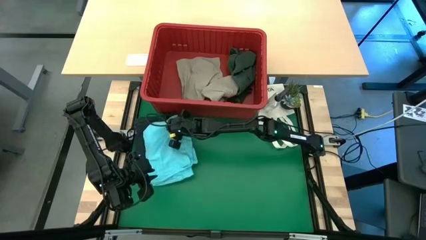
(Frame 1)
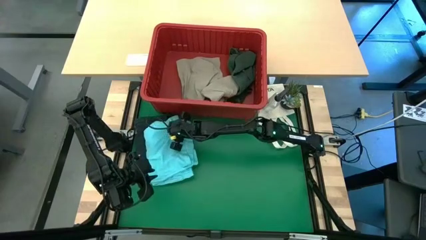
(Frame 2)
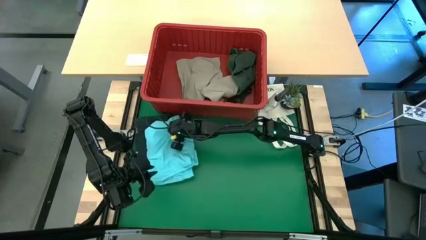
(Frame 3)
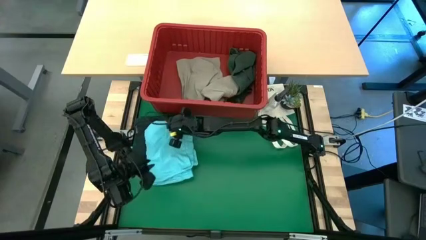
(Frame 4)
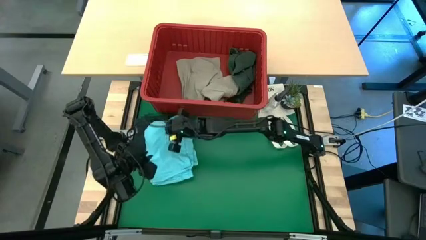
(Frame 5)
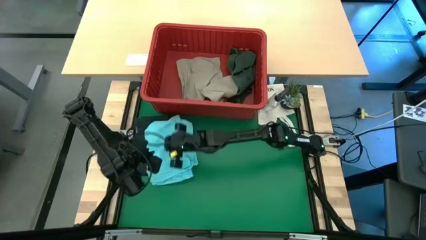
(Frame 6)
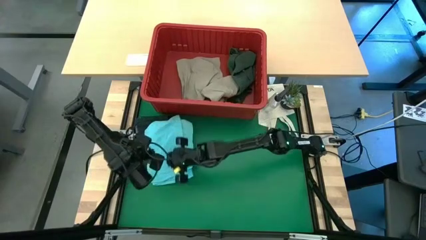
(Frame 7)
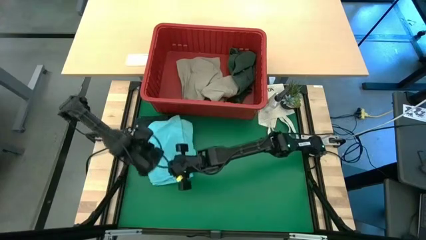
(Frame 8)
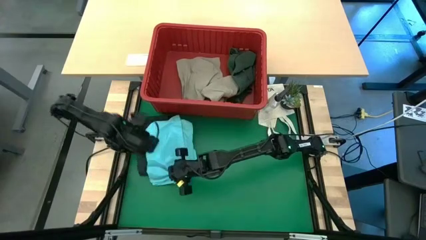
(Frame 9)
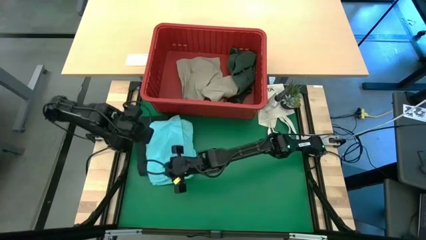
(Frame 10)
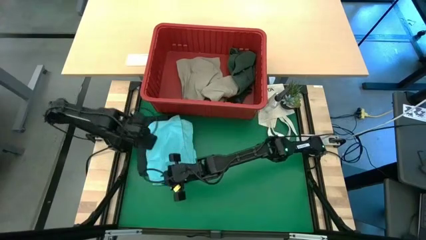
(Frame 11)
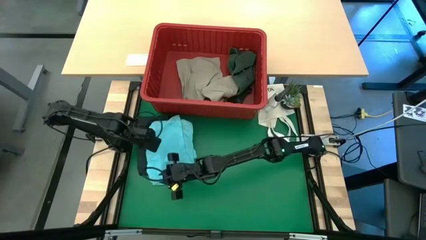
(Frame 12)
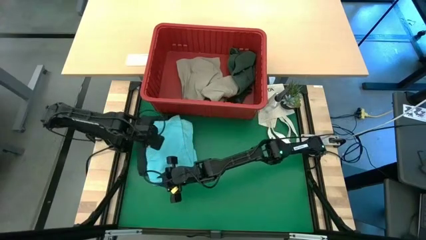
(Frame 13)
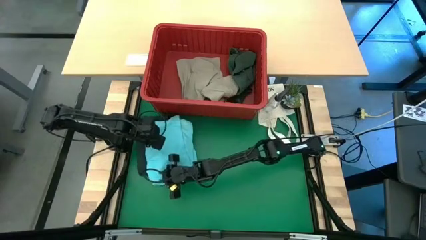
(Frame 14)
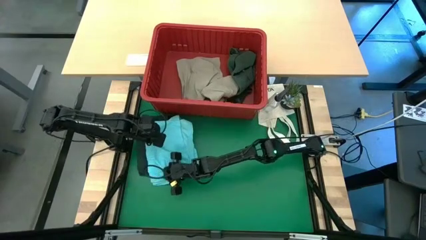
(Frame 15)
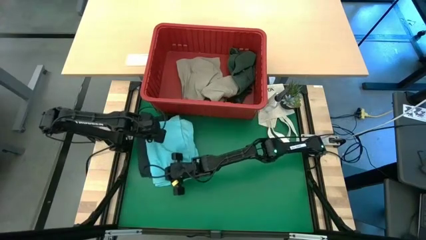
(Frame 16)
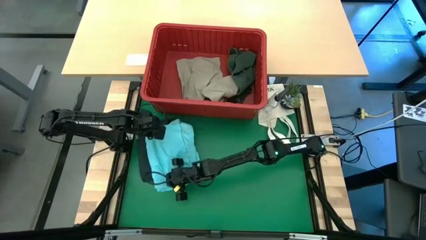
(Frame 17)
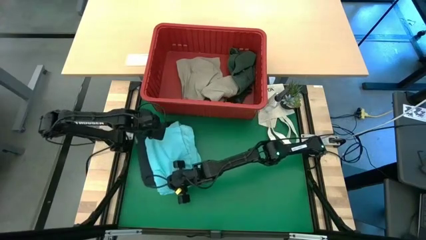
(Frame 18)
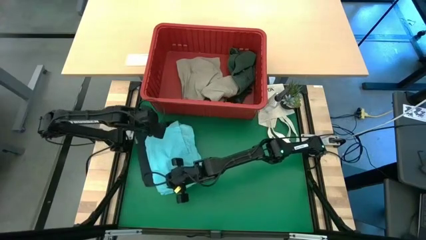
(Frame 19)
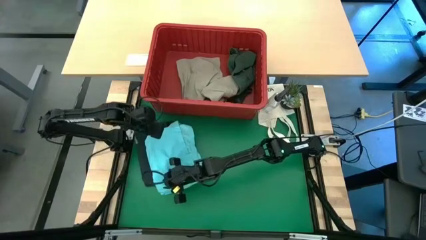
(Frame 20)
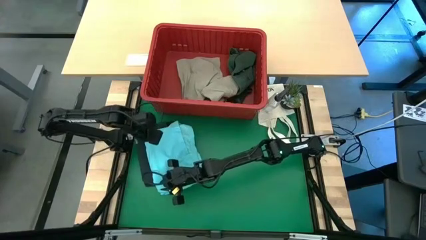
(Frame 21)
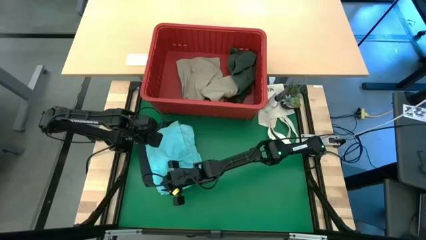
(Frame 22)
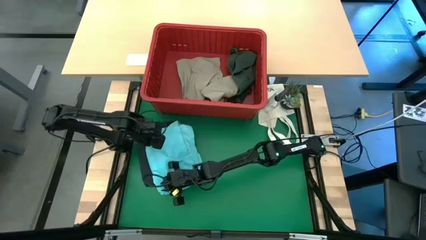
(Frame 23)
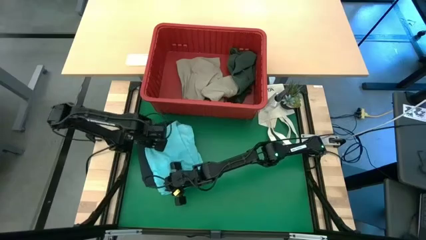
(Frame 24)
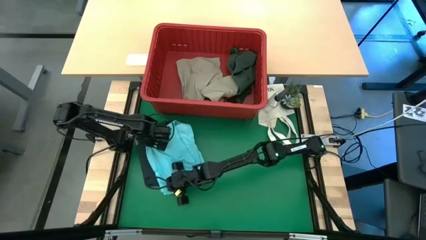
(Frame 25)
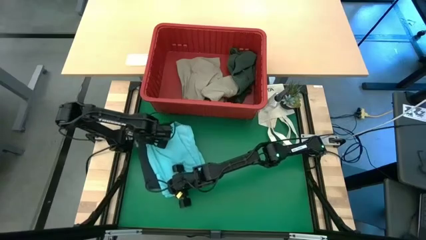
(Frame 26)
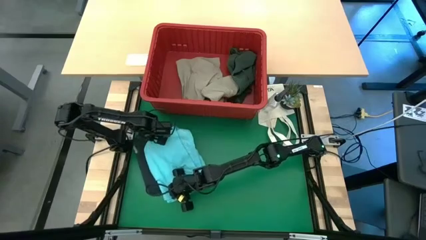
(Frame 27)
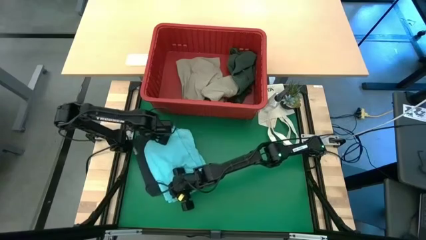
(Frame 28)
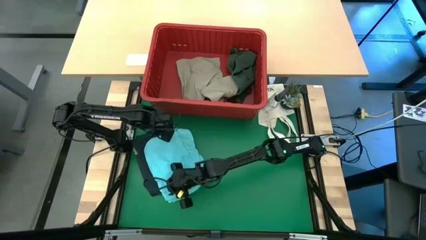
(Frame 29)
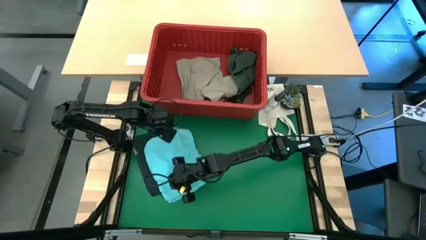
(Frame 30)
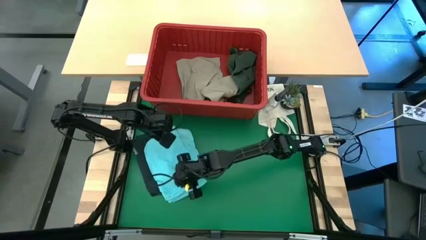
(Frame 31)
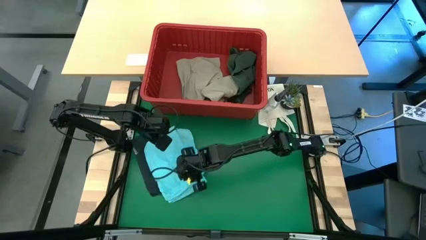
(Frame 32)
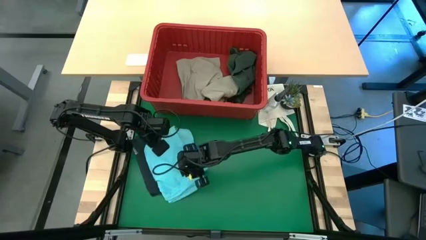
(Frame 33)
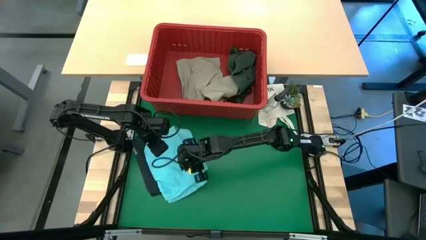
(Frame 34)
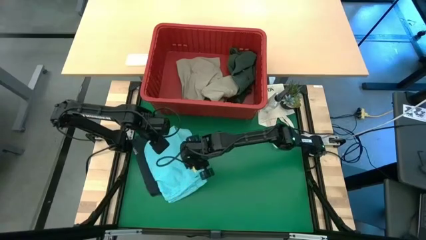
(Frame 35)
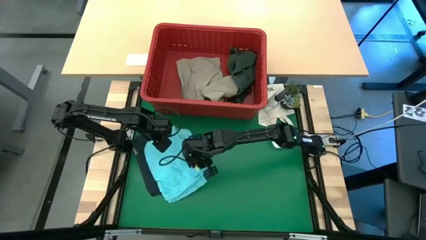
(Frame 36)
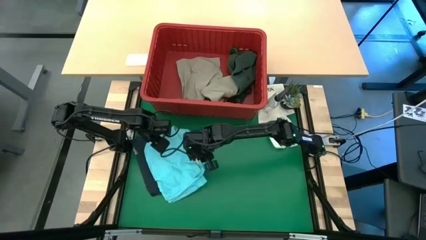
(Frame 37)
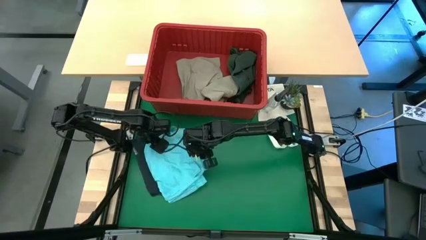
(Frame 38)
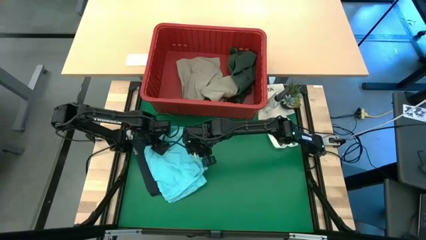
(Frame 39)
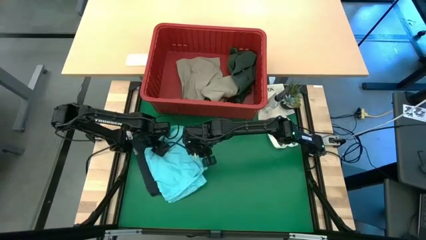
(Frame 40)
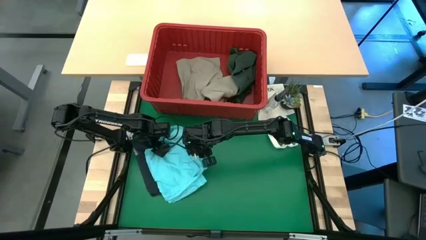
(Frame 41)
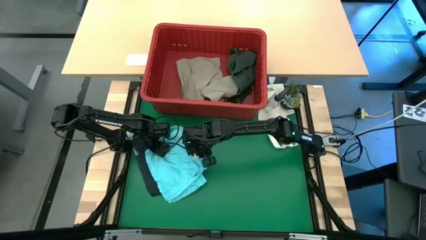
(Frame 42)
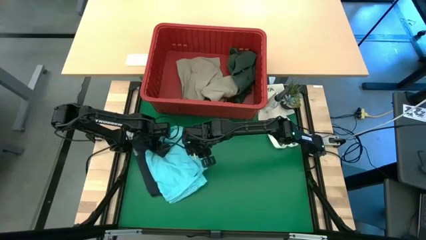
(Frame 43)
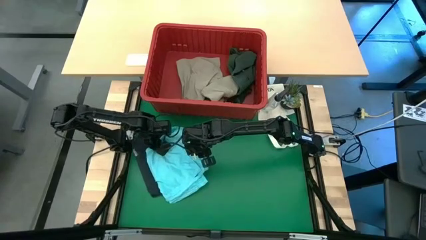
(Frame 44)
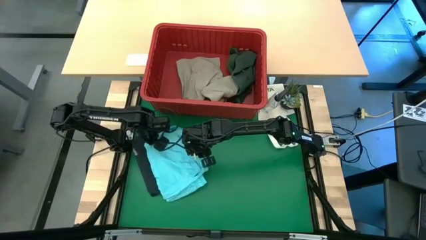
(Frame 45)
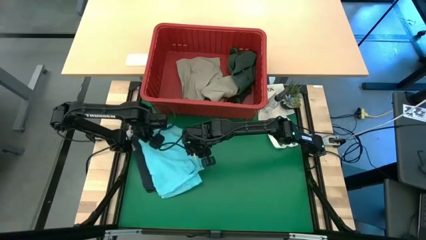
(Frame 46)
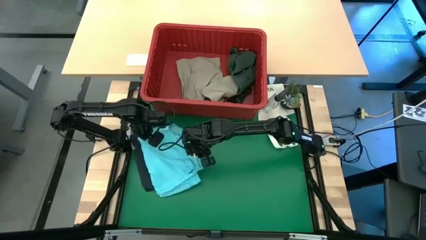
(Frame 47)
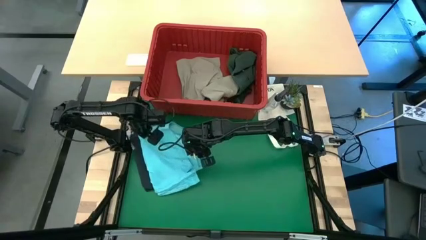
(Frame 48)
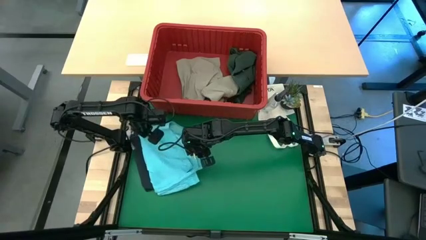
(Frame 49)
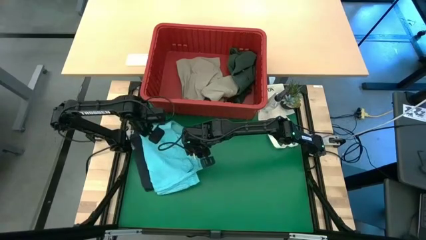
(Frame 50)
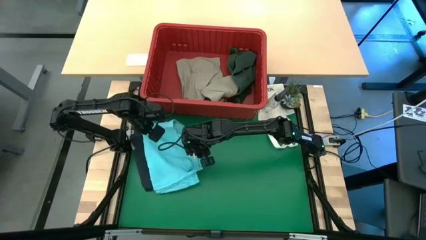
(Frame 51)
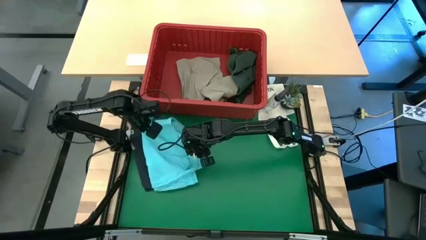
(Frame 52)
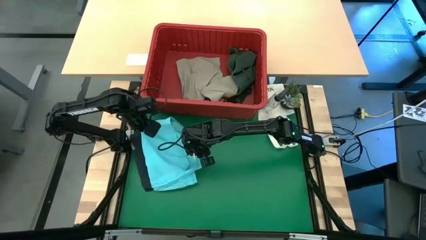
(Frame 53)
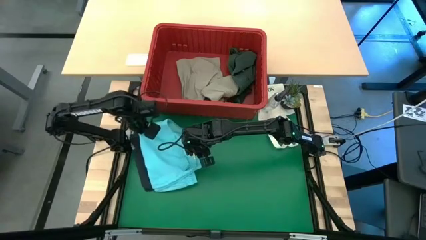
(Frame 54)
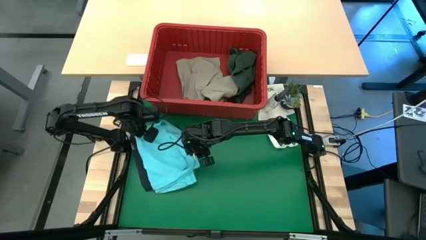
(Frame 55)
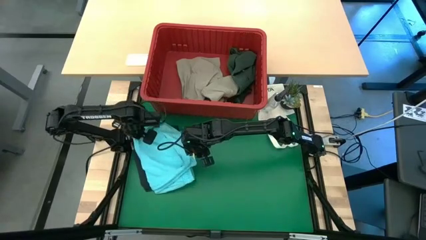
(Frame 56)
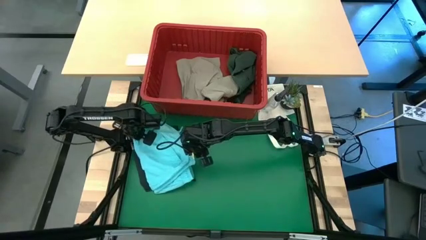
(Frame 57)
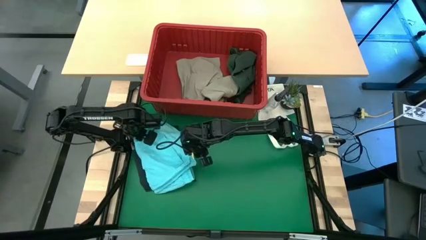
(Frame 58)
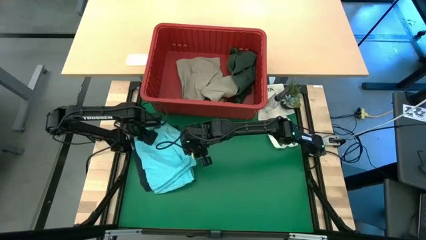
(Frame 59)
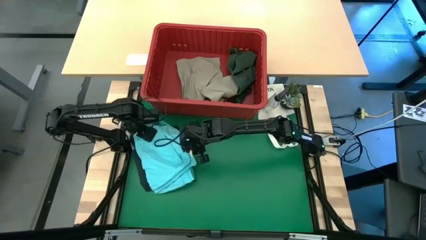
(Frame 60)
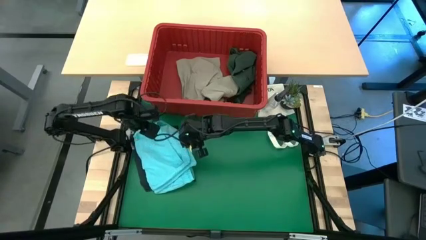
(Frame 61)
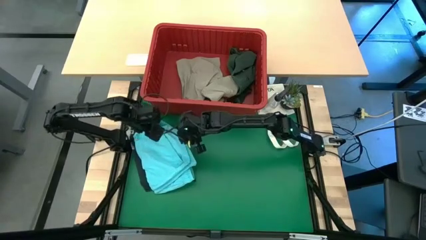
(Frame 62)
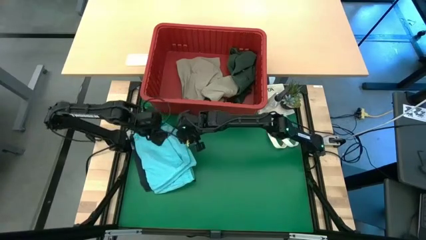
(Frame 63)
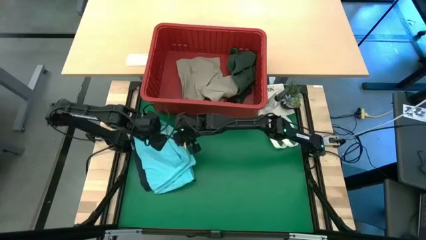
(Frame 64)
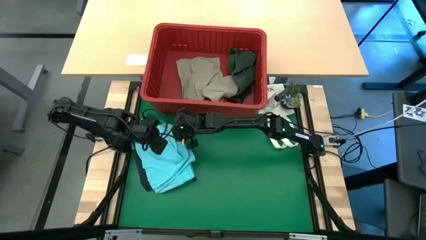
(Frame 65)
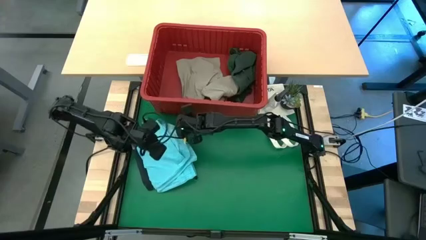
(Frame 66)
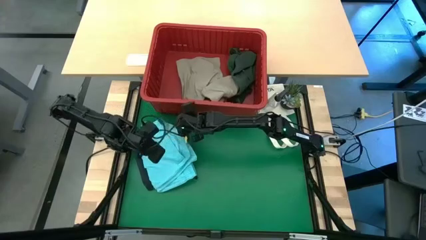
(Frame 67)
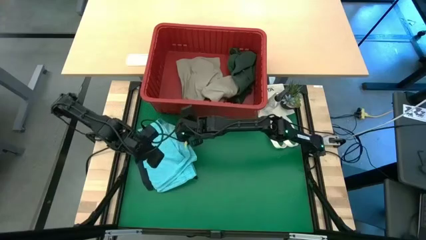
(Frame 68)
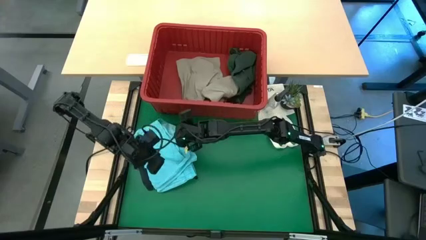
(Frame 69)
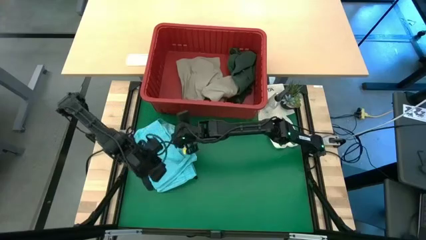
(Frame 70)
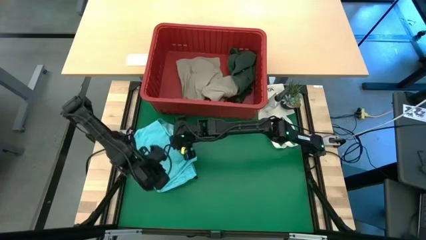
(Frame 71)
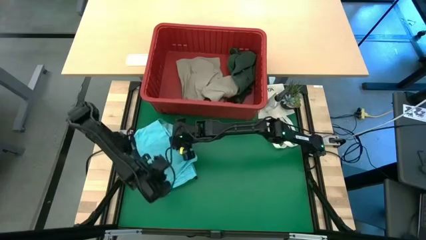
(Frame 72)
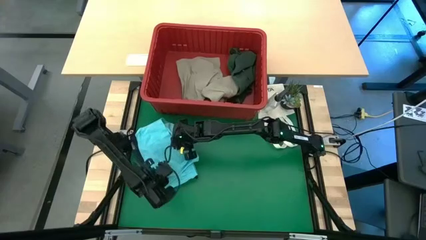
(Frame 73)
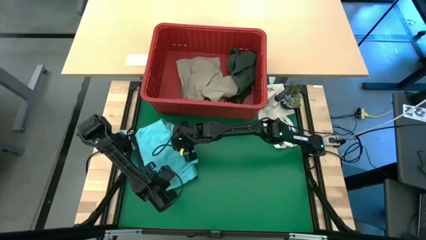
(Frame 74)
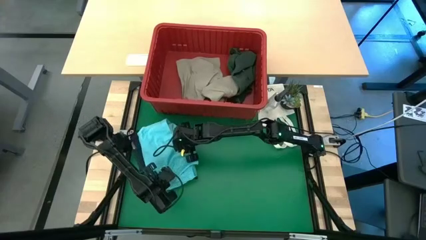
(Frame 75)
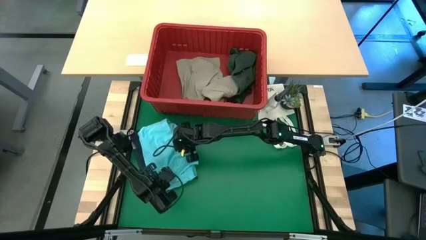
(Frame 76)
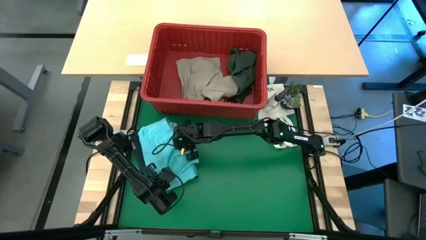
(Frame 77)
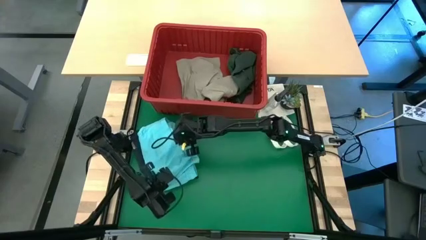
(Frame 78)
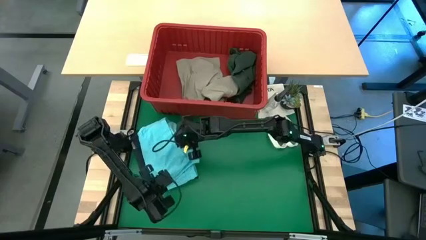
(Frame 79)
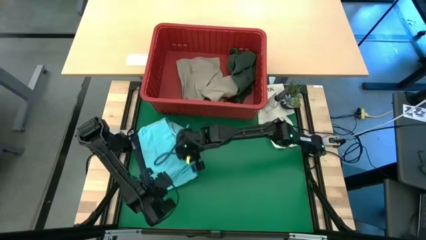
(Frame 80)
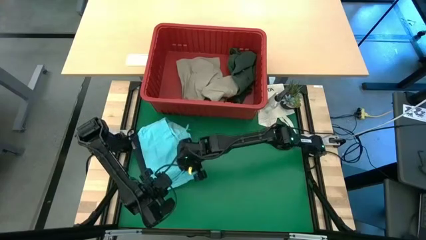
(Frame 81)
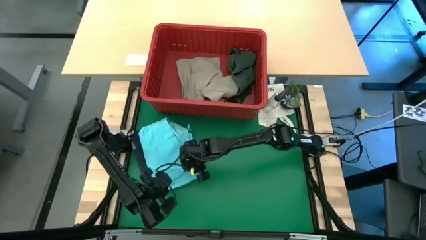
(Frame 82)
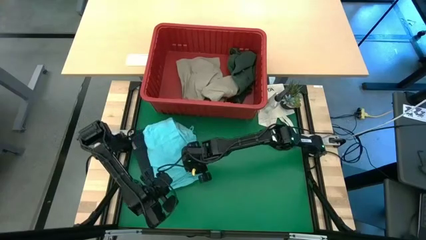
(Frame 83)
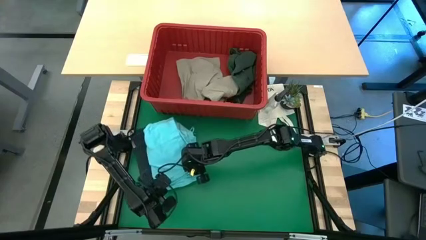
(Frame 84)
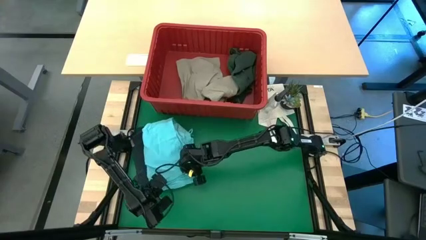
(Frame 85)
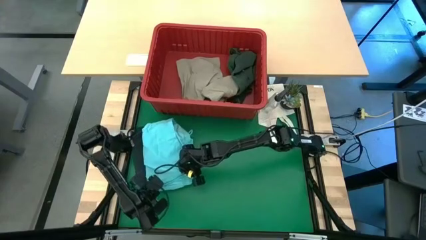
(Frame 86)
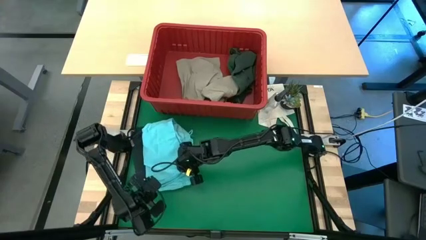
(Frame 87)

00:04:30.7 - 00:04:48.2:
Task: Fold Laundry from Bin
Stack the folded blue shorts on top of the folded black shorts
